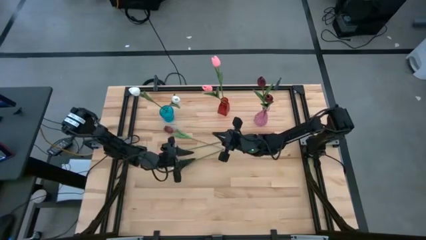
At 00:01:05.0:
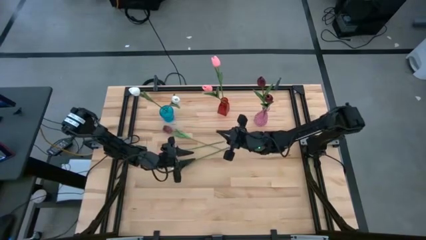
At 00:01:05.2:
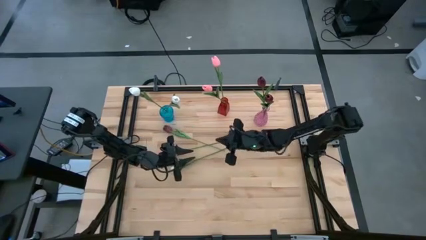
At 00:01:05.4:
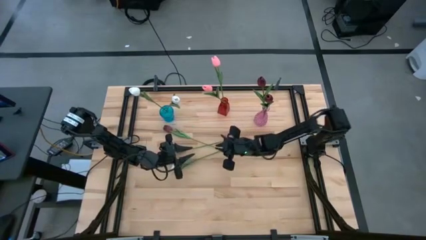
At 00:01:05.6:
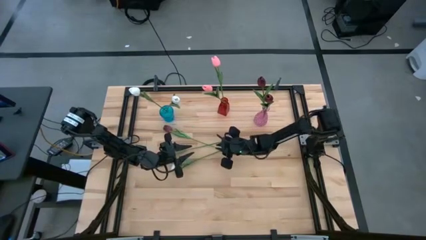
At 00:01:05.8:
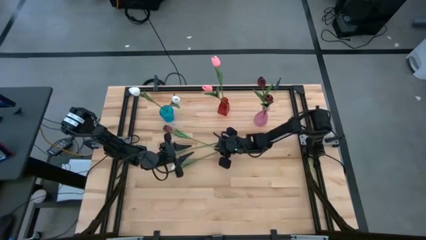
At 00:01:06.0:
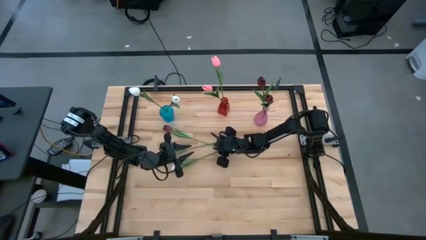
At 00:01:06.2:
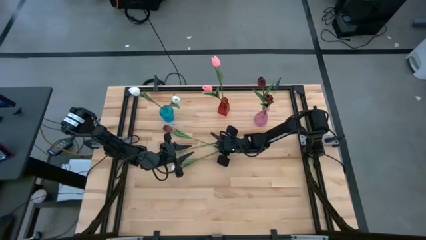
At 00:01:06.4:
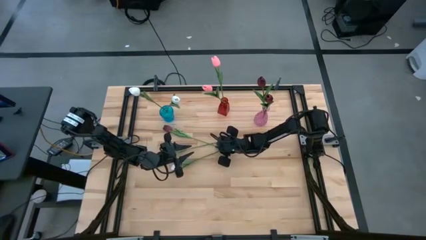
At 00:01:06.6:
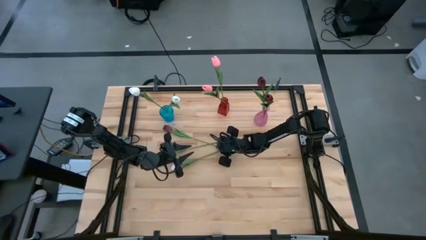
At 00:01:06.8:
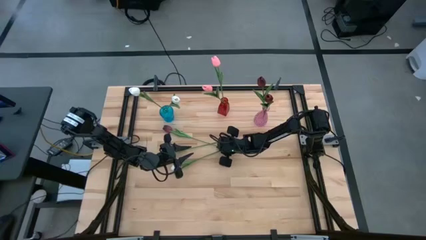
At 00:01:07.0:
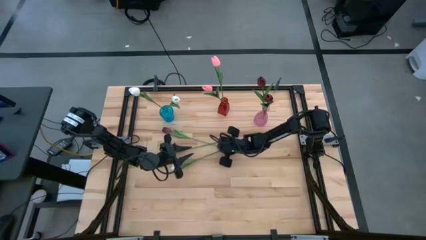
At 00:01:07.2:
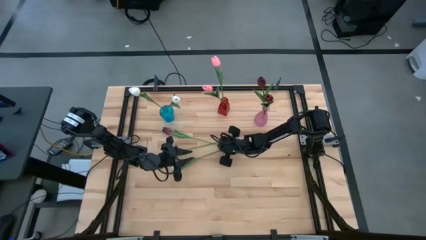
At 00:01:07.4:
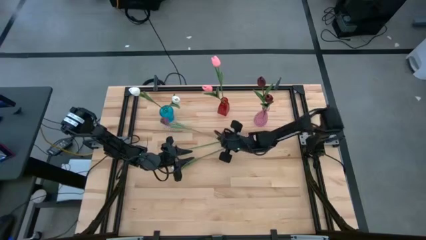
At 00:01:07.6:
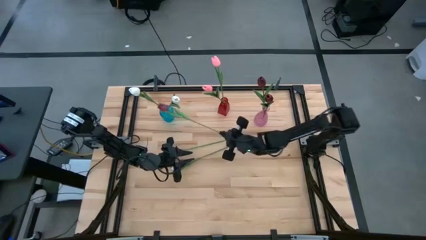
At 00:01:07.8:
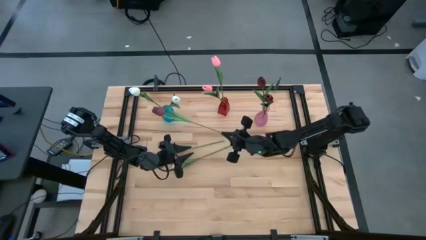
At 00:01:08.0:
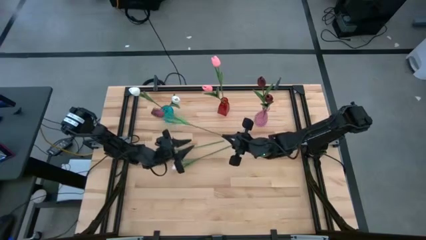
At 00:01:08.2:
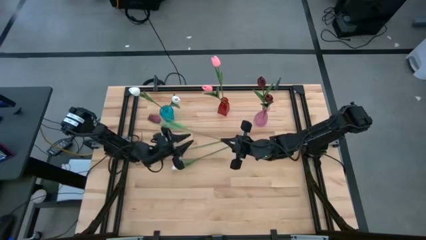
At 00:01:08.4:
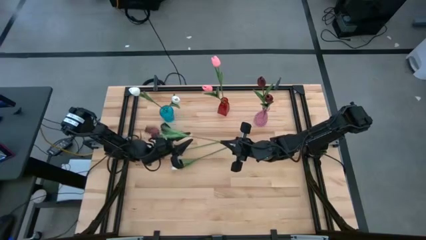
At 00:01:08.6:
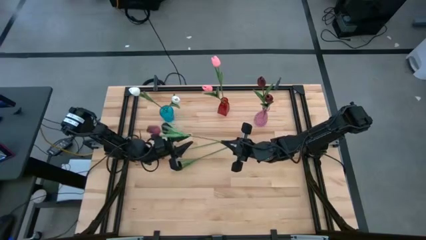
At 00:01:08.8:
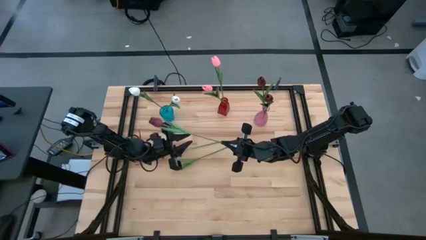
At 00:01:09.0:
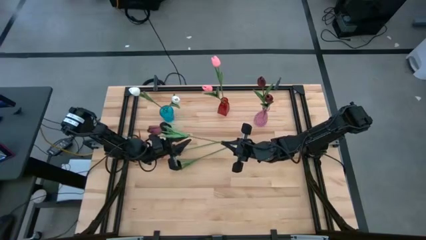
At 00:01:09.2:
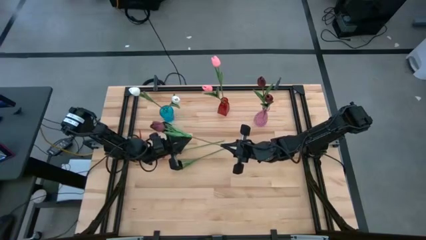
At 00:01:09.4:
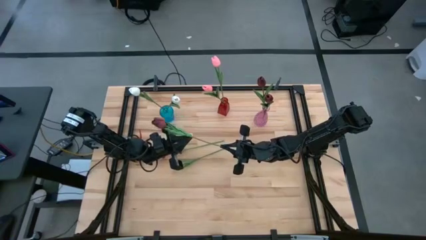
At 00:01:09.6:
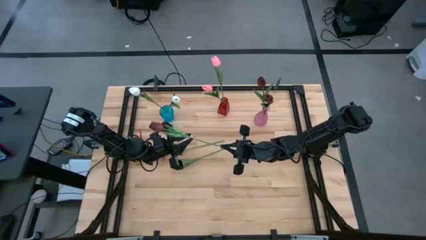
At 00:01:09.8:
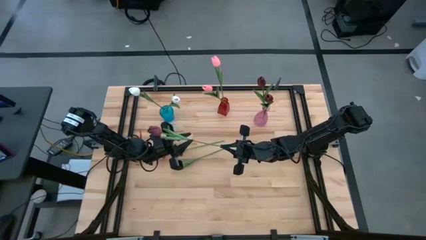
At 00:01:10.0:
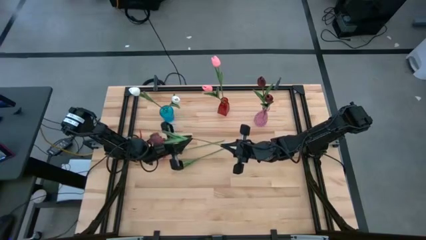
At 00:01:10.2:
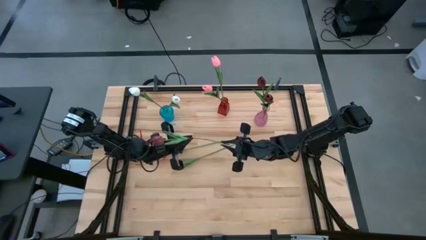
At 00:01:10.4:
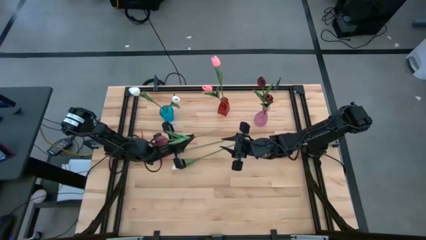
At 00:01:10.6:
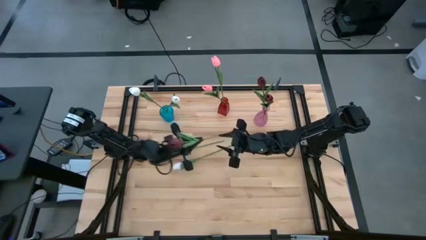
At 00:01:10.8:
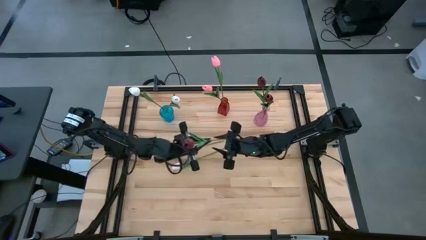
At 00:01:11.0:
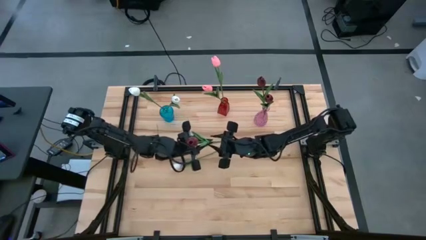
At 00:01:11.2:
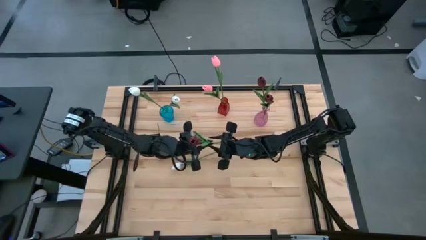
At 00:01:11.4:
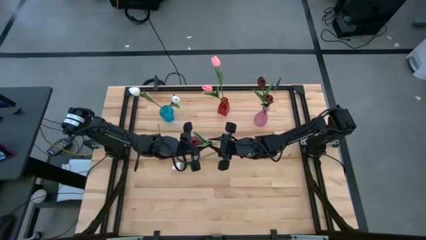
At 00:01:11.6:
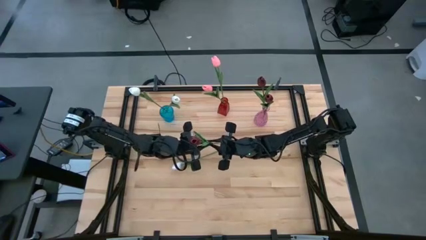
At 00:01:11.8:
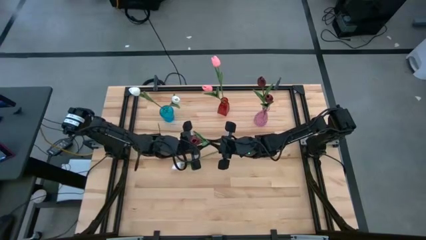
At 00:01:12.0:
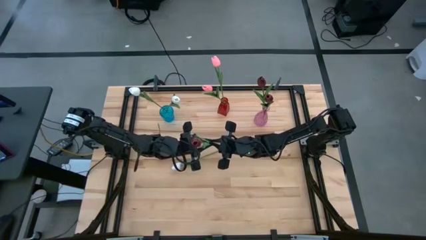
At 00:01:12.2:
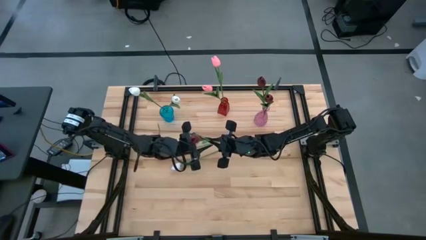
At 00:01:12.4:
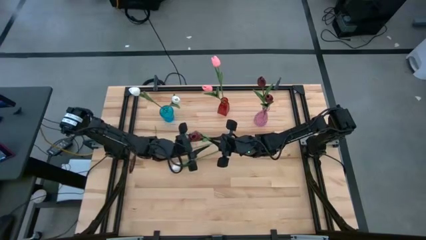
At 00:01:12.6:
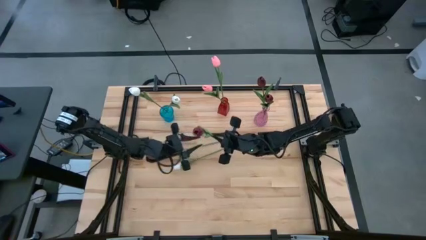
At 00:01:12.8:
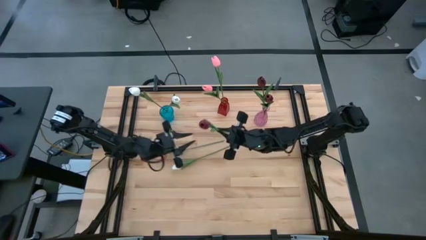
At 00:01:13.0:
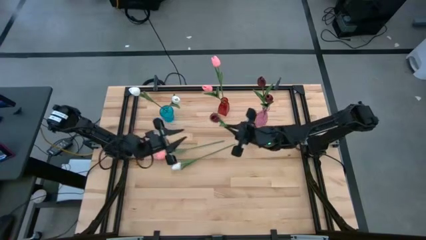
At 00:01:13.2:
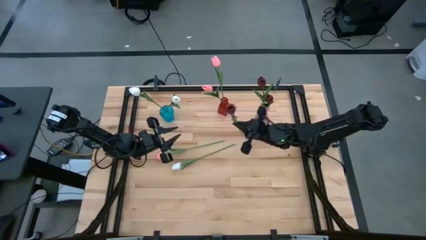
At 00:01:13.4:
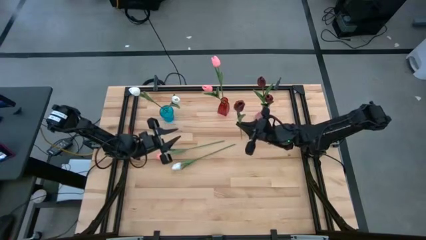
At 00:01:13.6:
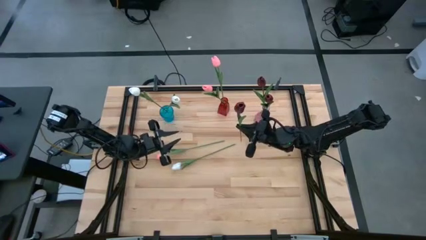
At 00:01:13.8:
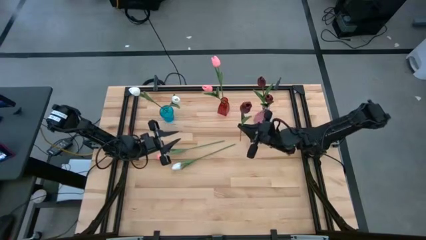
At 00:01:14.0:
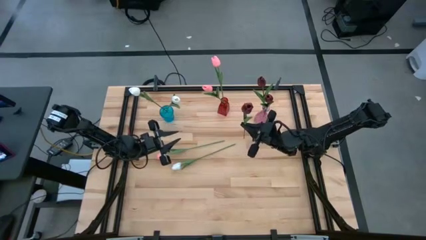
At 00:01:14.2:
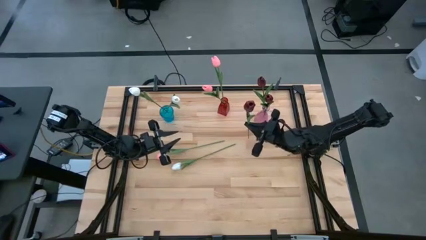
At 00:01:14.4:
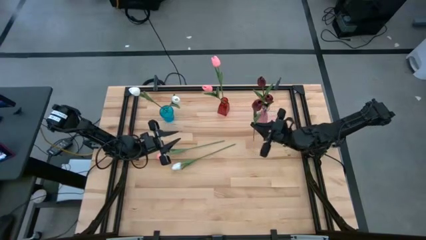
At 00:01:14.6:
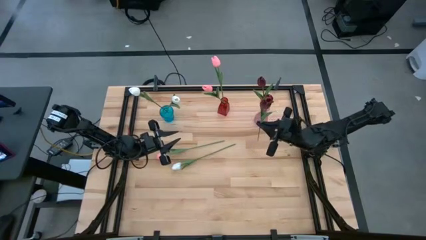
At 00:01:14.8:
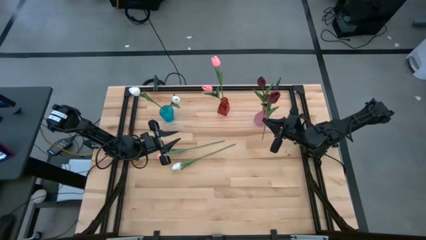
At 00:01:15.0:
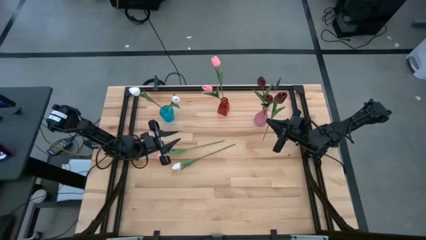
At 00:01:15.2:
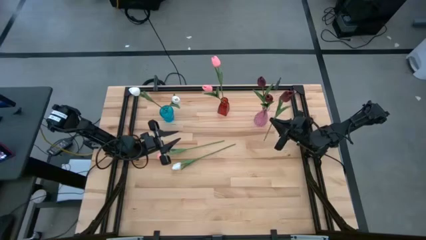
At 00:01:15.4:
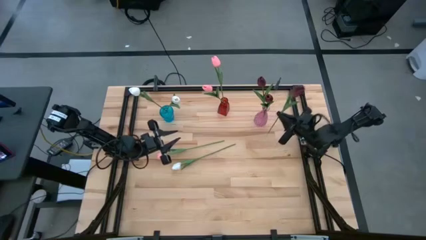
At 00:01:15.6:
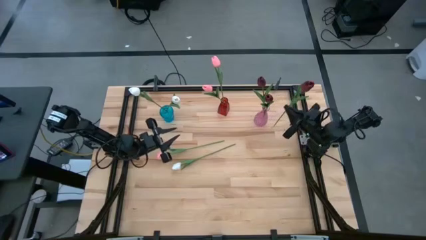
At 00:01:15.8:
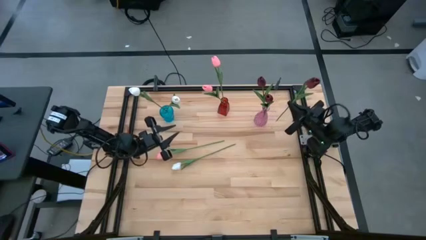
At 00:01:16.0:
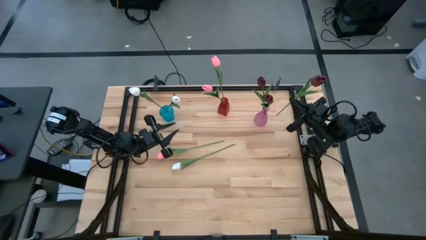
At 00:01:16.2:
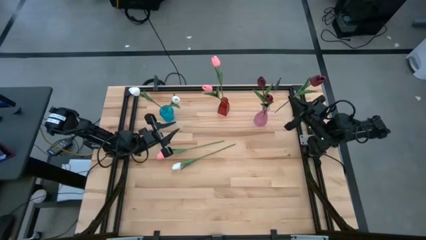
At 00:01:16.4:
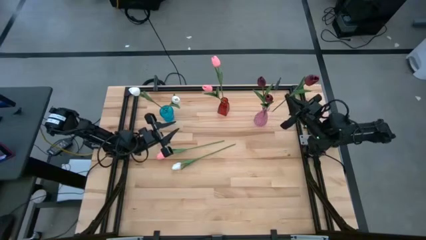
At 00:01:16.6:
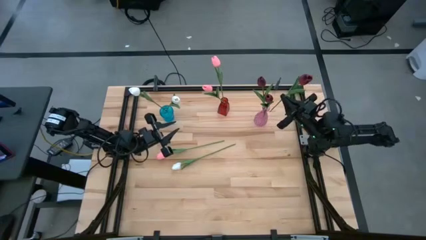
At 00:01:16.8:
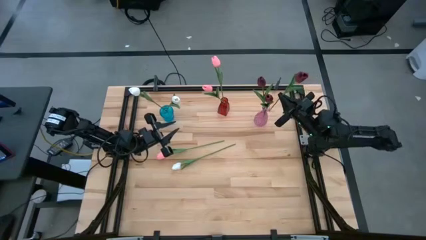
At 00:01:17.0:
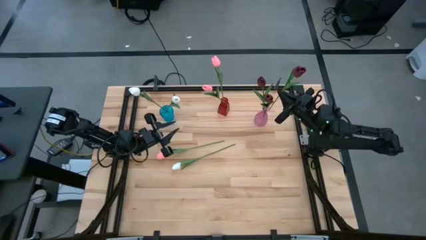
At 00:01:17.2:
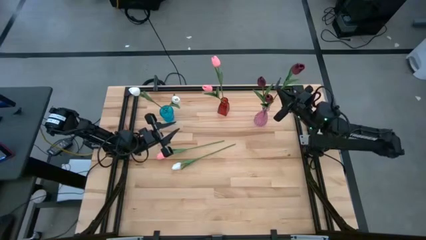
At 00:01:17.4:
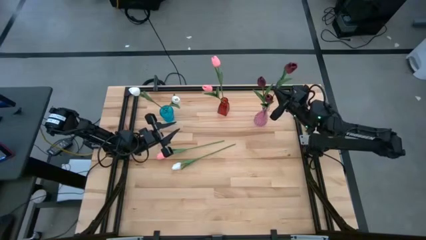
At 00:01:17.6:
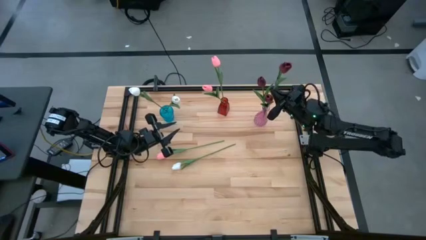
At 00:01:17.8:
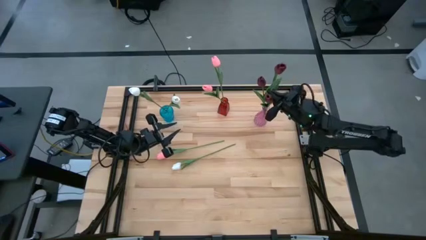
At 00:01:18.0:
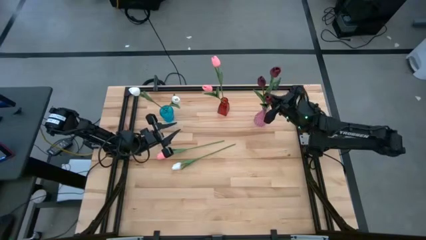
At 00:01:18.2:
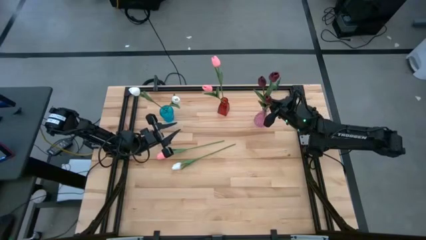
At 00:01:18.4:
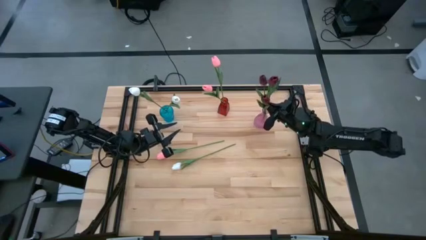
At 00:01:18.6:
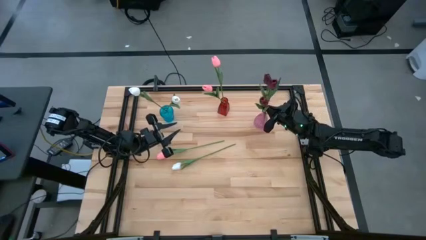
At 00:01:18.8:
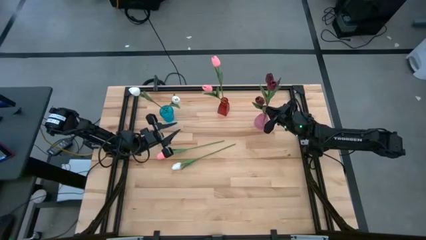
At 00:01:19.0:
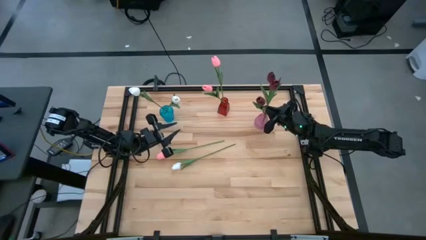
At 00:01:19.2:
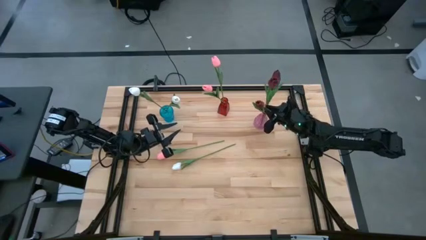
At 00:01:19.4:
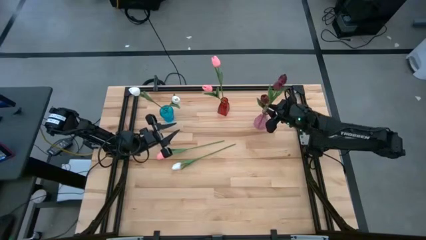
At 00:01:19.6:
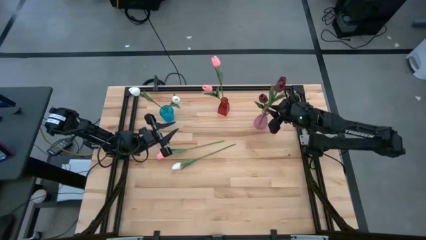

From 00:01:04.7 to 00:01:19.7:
Task: Sort flowers into vase by color
Put the red flower into the pink vase
